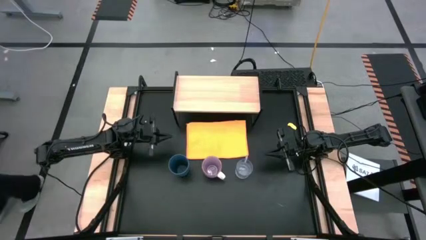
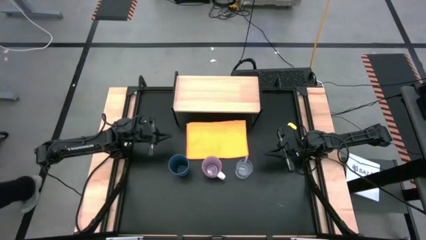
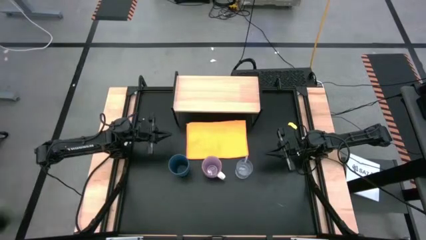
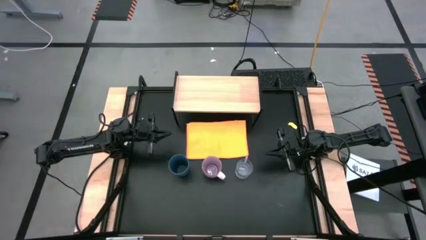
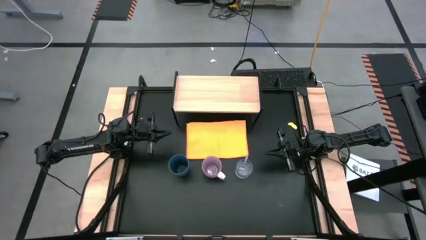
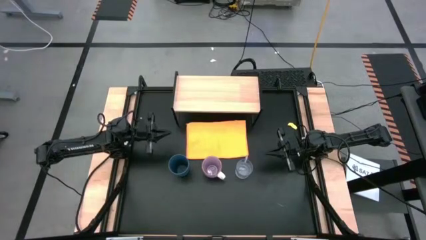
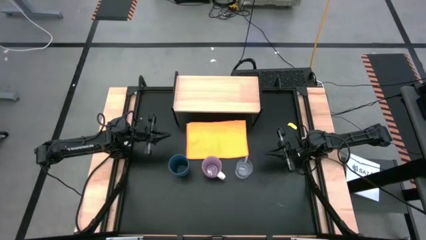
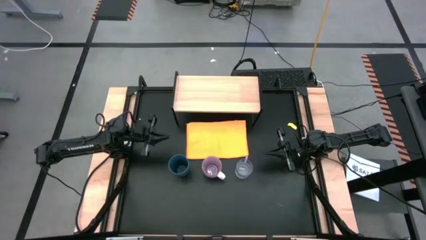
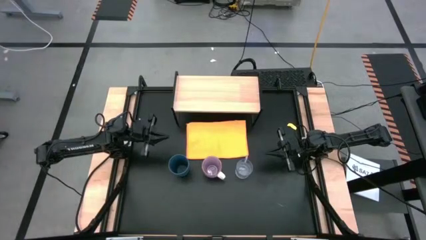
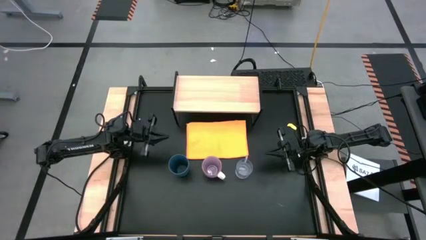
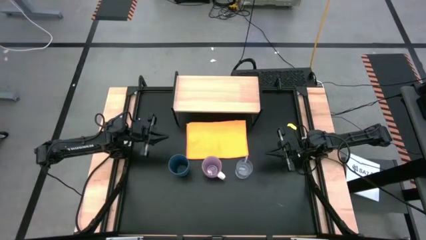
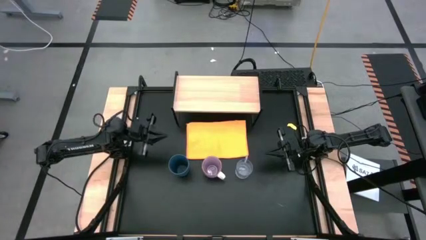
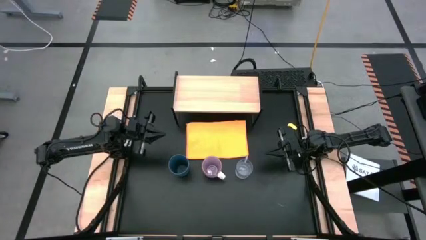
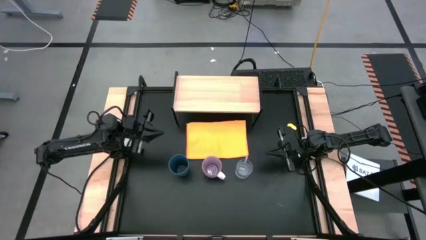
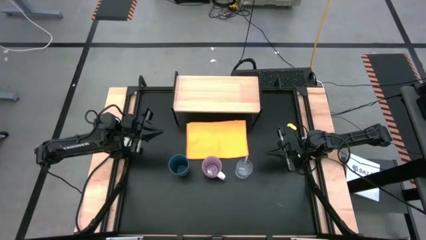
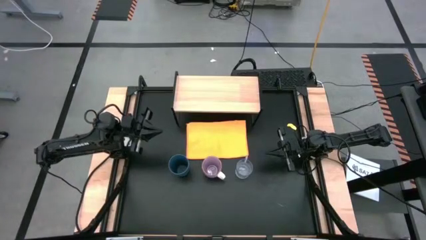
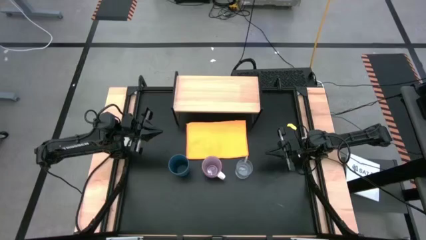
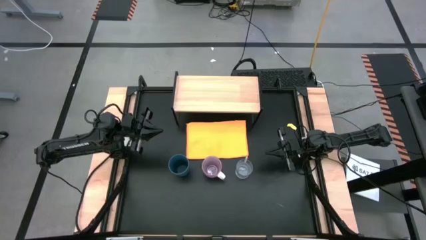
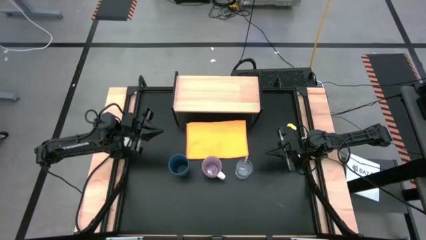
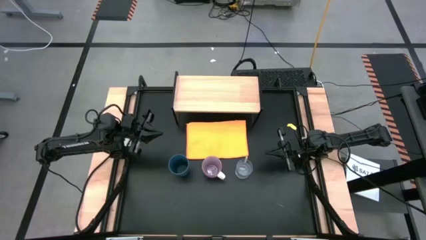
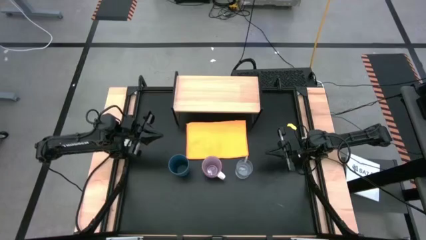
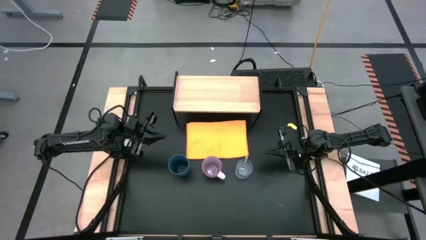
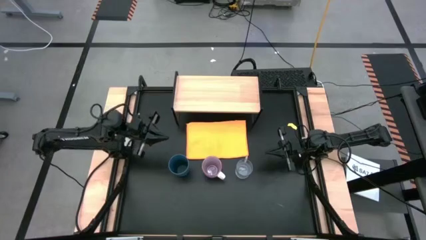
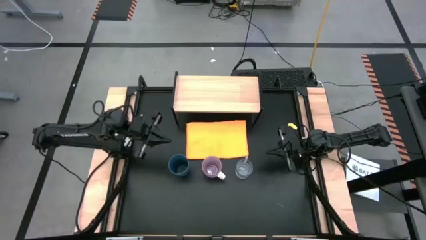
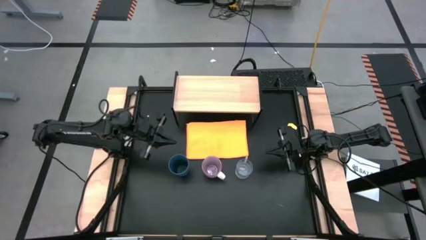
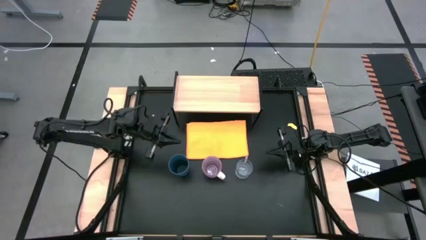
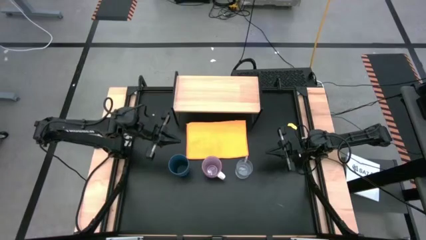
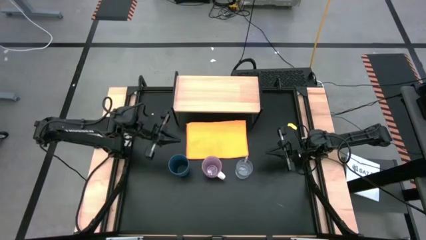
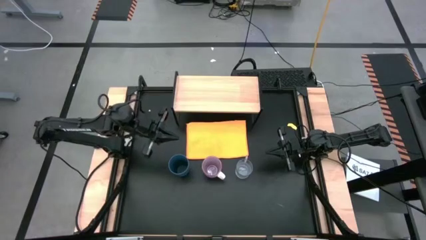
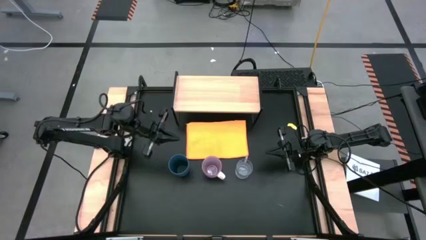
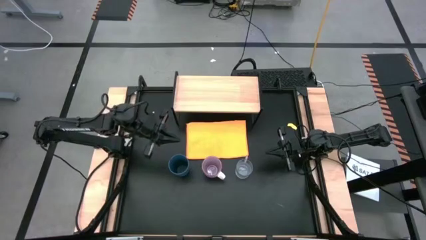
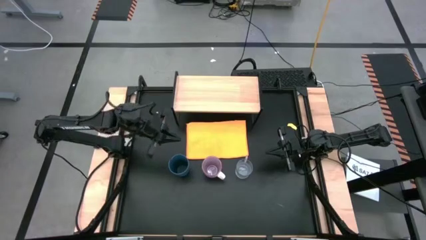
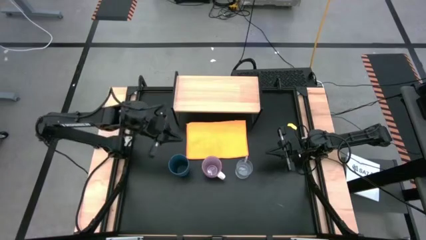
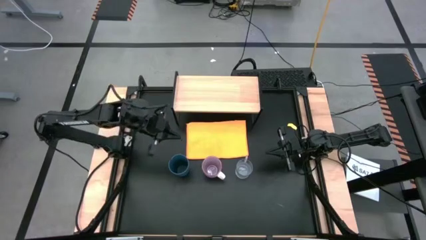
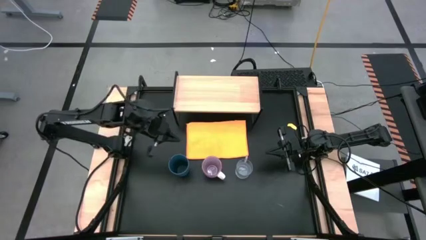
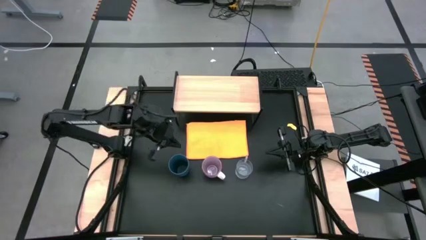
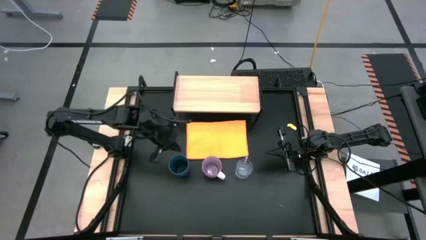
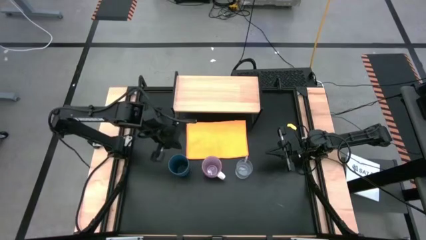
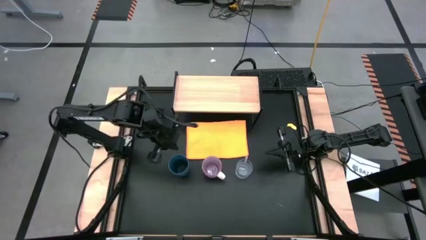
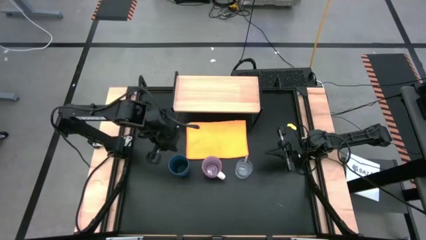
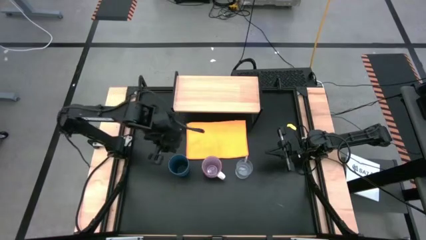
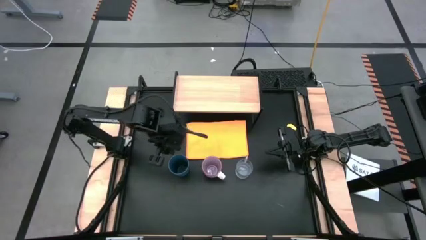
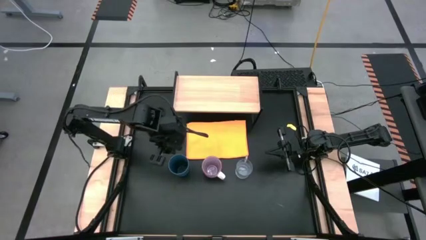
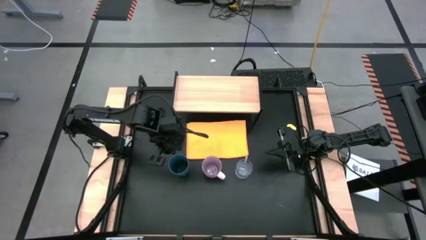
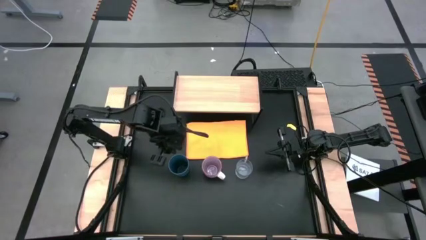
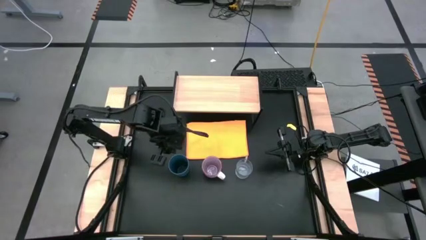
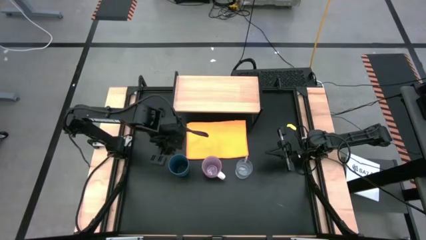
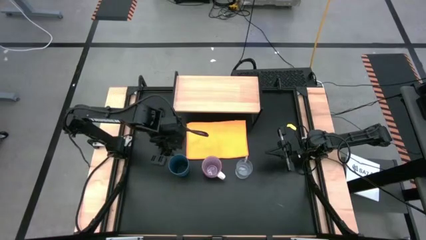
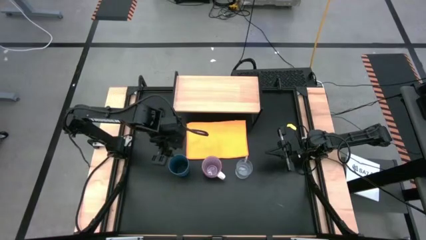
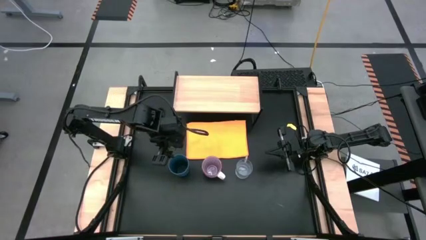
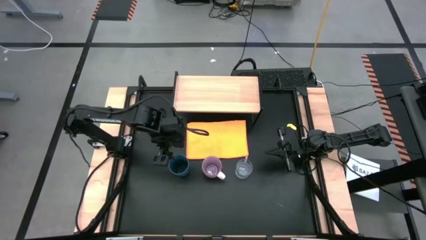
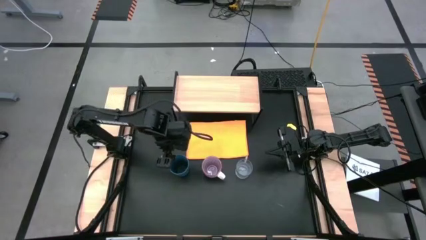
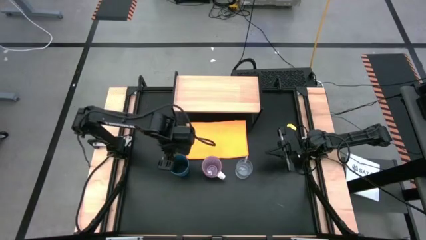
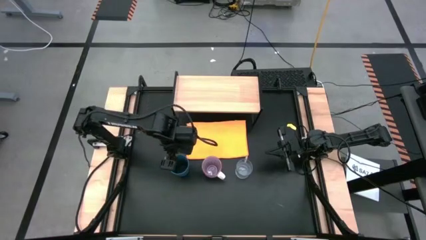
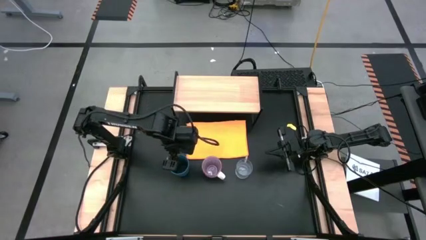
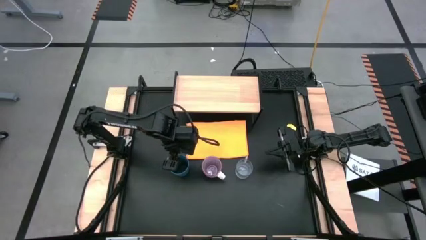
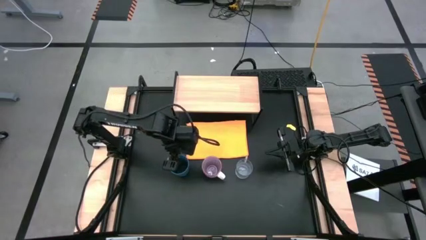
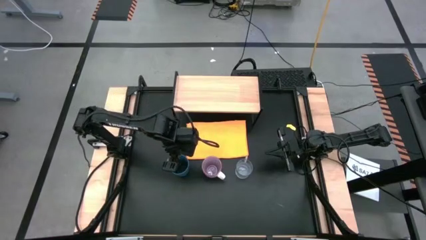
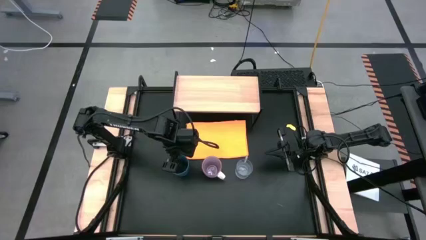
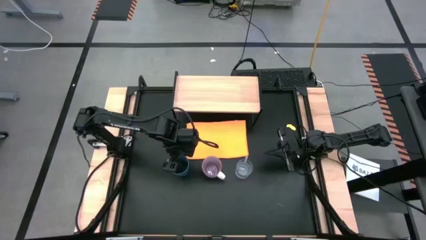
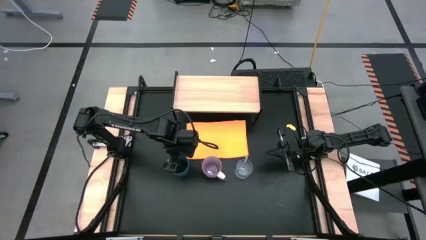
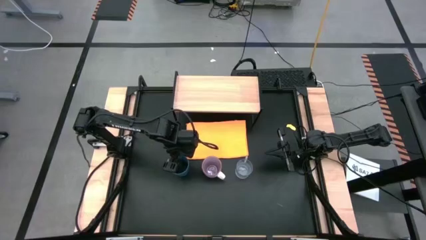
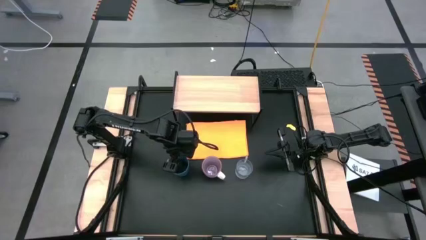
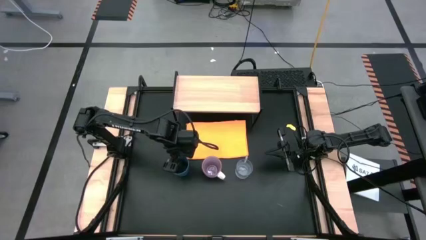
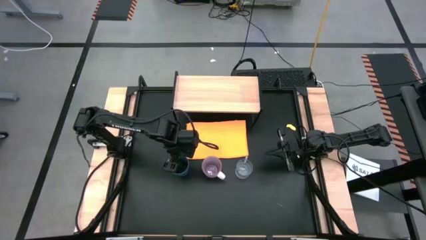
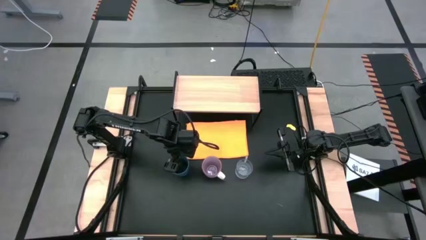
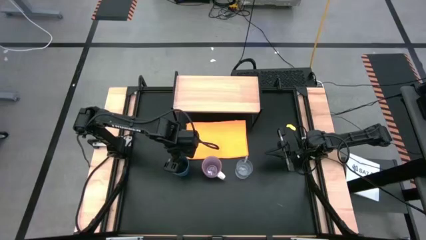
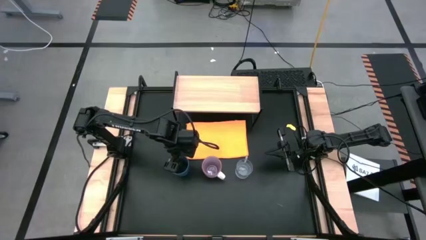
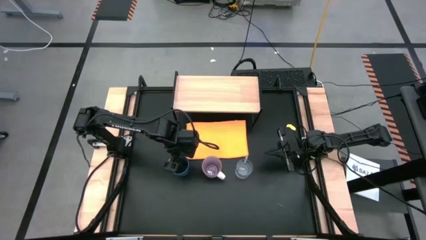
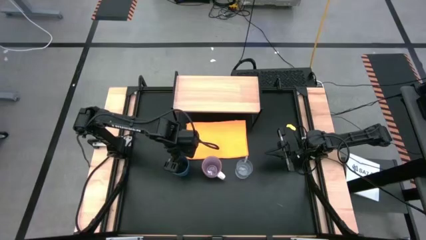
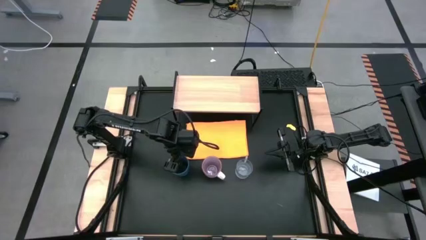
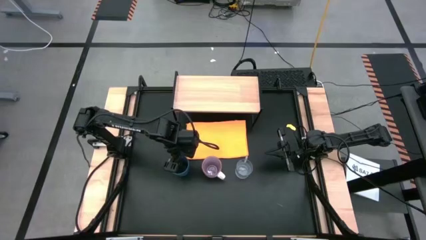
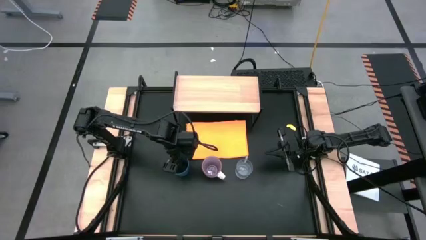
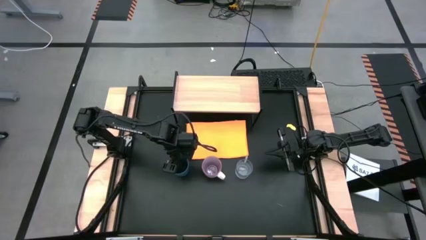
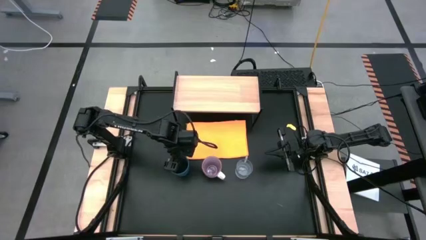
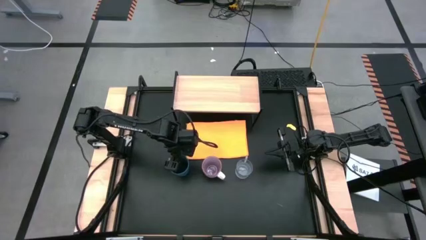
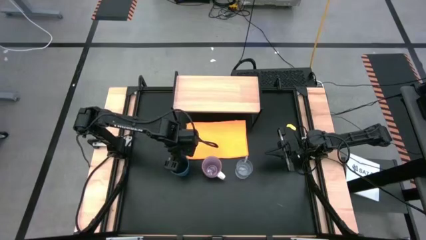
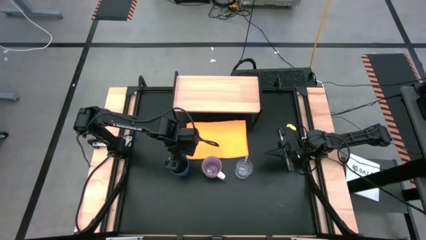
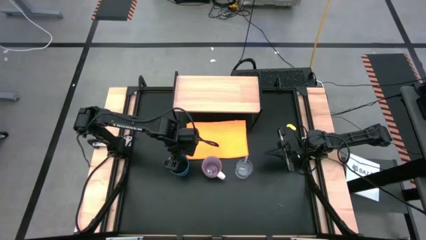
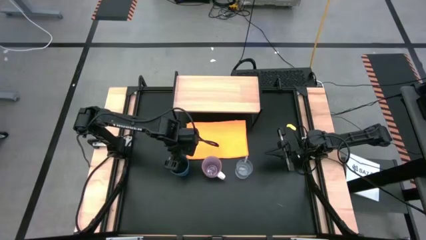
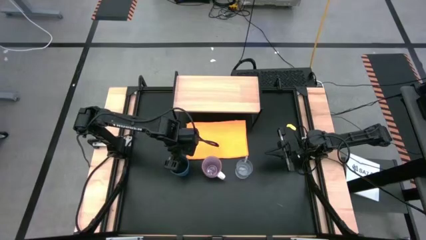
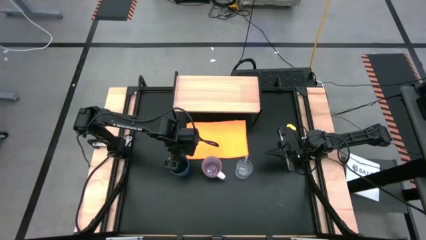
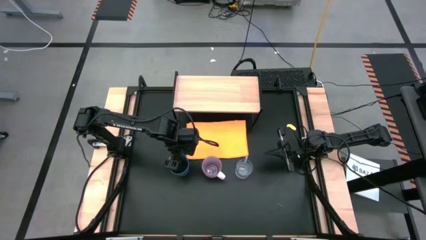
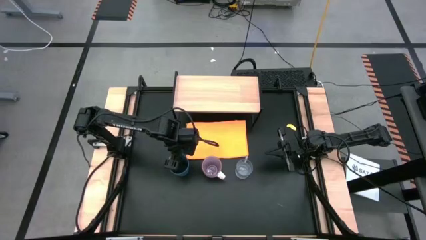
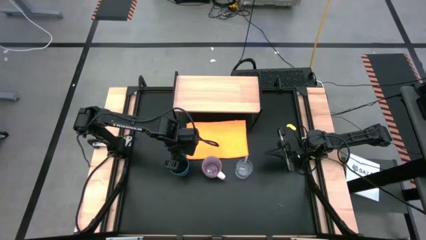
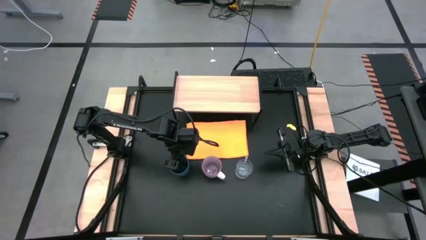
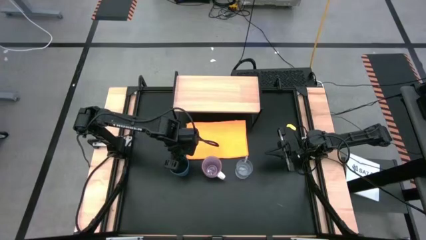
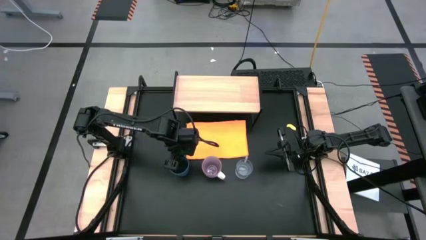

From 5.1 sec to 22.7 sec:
Task: Stack small to large cups/mugs on shelf
Put the blue cup on the shelf
